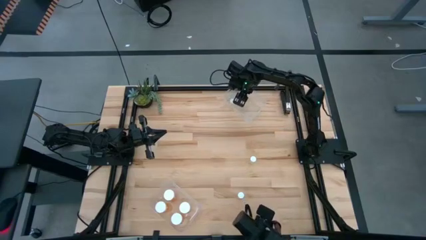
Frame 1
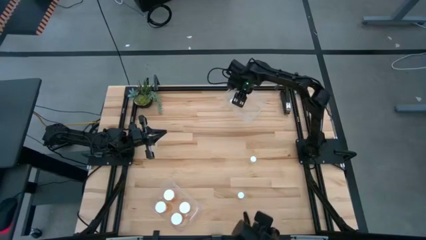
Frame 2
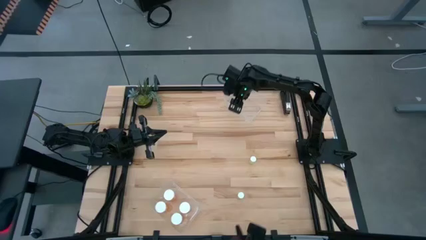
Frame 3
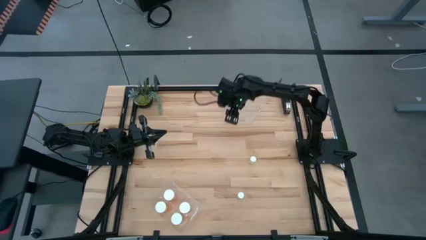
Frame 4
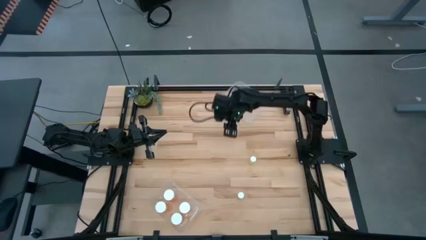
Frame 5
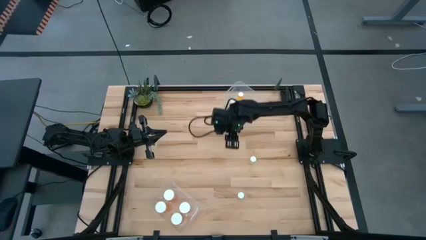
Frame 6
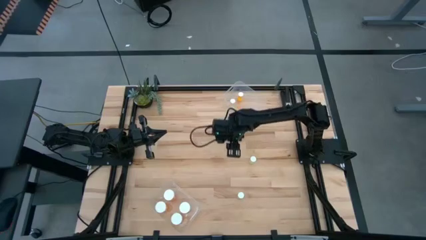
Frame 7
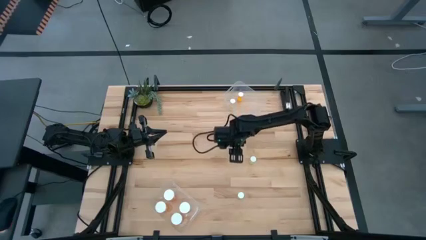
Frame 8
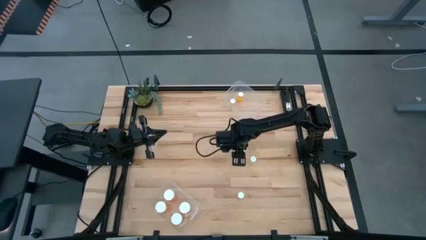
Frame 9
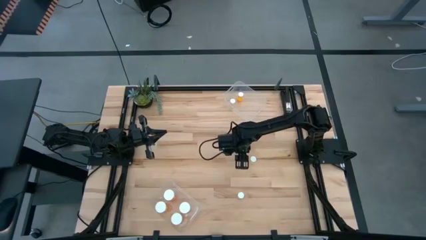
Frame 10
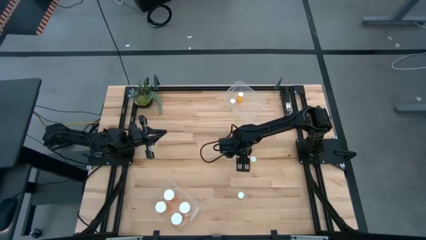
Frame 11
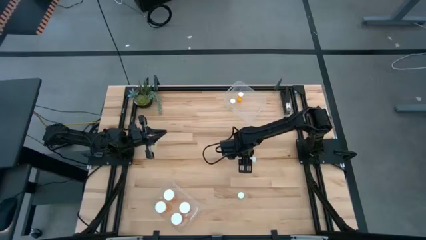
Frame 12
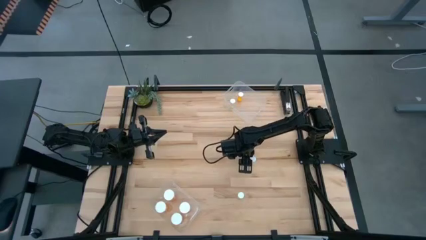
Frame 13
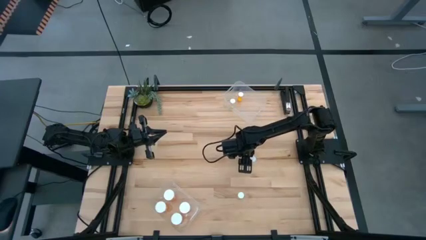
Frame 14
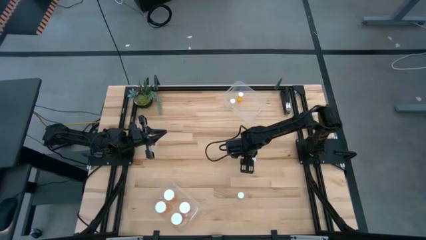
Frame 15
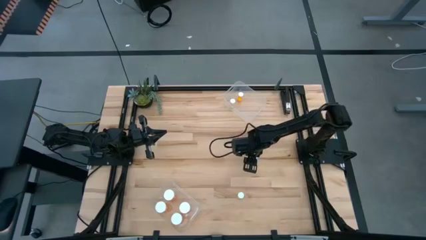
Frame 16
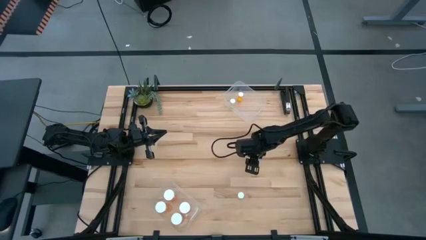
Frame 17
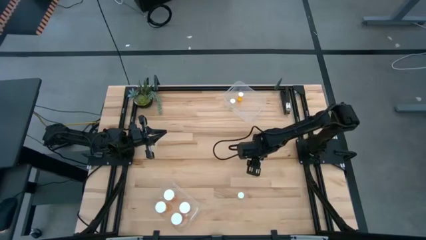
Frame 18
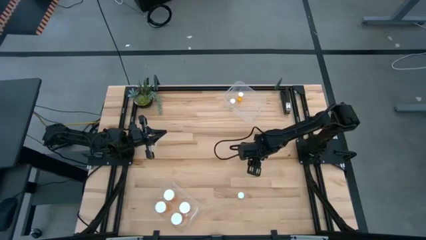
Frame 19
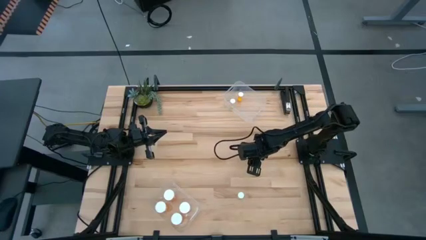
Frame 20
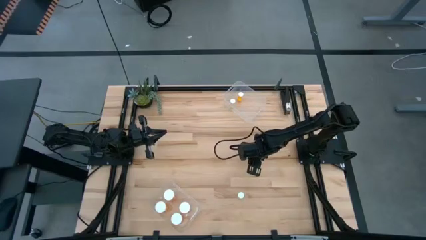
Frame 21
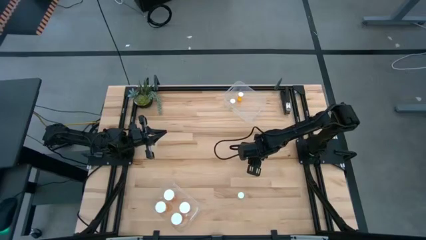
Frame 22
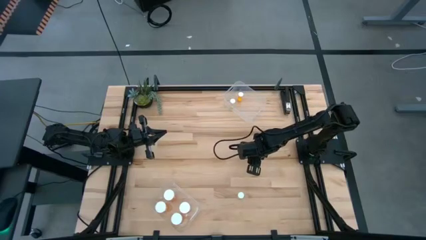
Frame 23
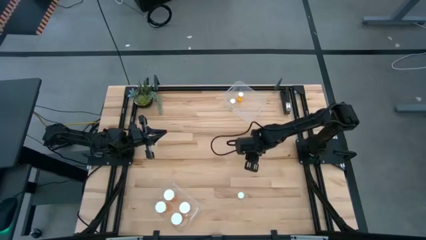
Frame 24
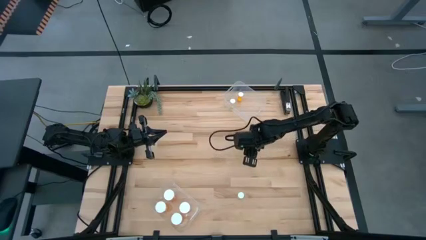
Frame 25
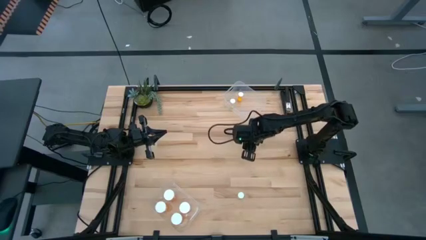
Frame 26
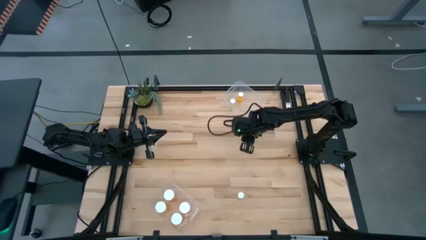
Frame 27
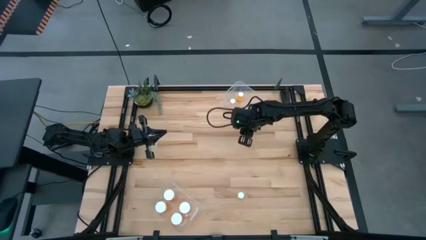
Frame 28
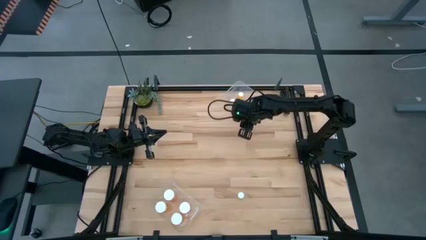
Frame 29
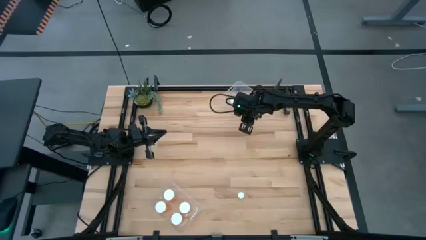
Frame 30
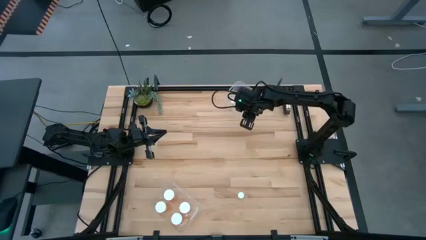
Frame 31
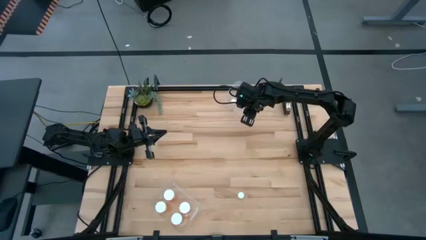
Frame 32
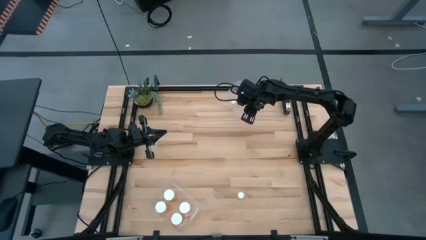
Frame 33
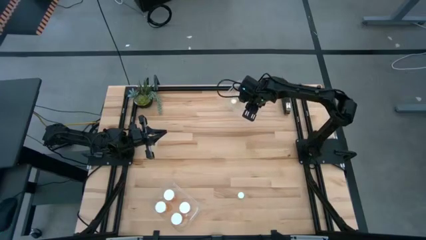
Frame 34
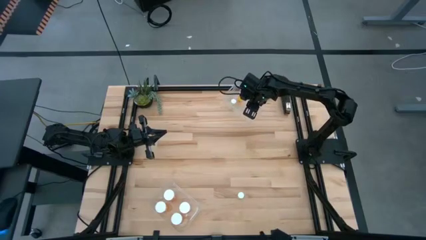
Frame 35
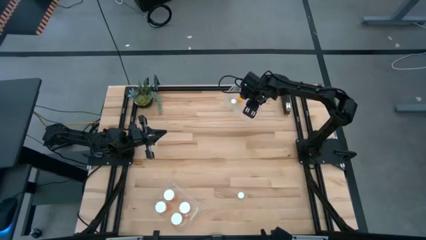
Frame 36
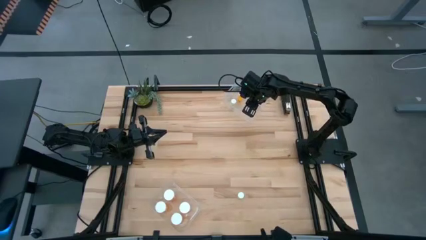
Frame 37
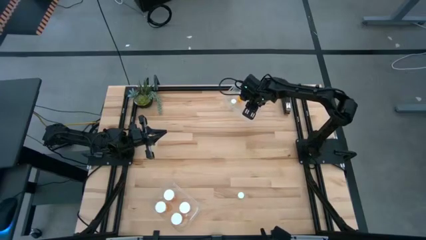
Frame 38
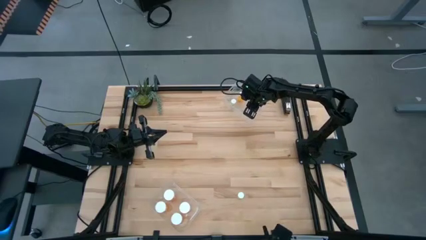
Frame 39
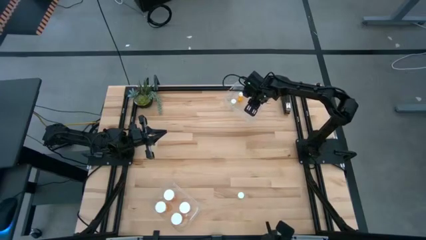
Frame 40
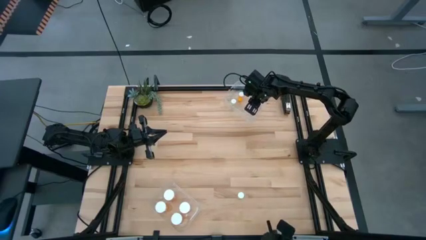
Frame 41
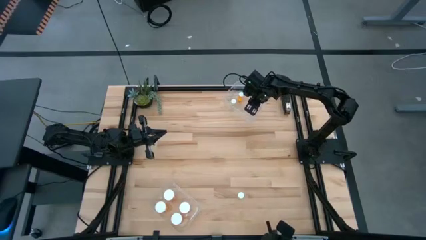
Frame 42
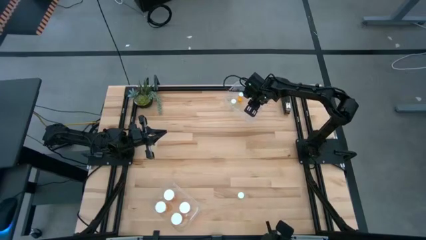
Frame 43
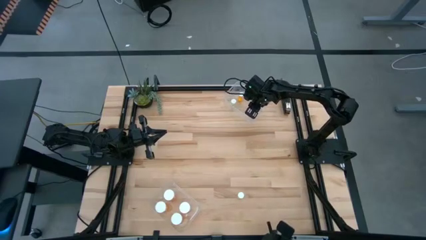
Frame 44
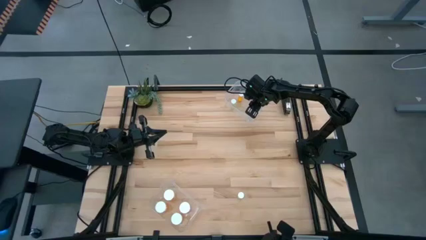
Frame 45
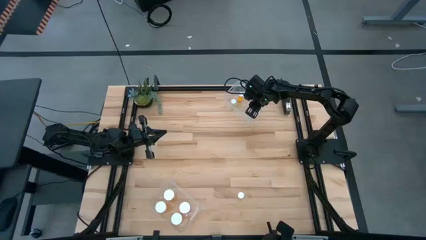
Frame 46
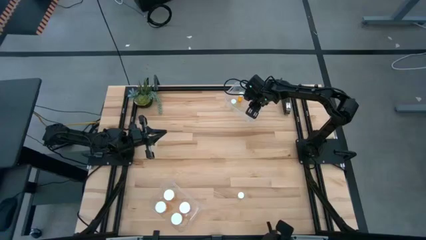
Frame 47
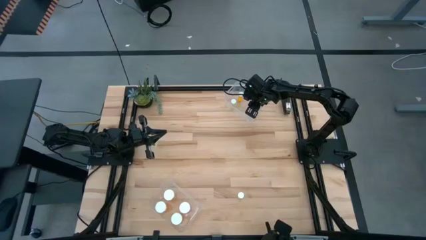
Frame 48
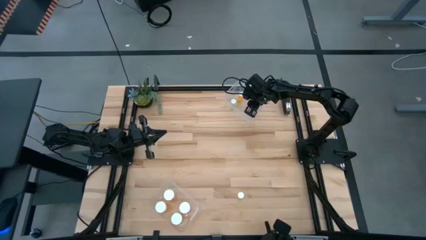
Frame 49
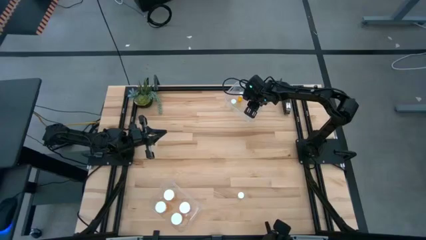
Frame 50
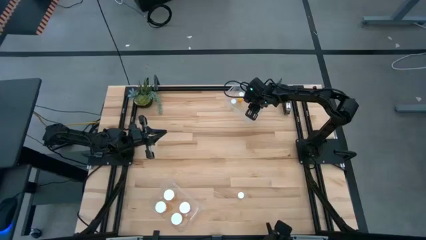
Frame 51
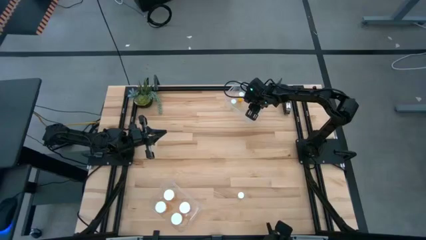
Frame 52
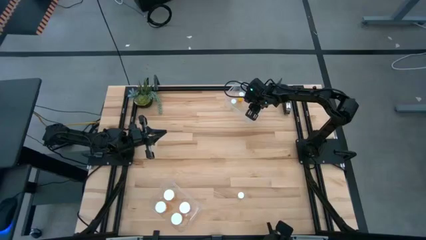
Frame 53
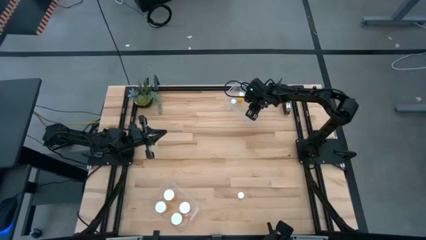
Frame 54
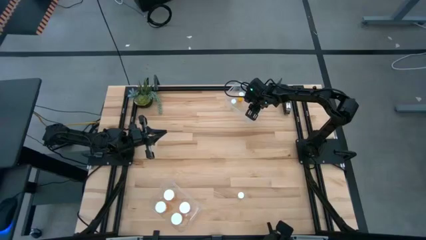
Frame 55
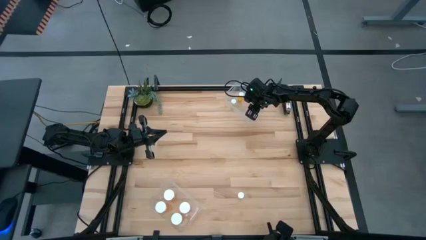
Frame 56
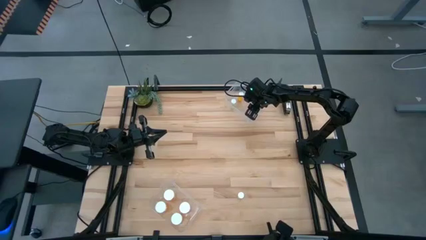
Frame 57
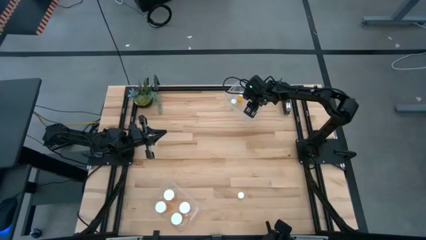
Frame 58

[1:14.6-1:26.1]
Task: Pick and place medicine bottles into bin by pill shape (circle, oval)
Put the yellow tablet bottle into the top transparent bin

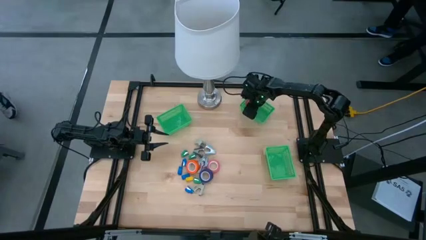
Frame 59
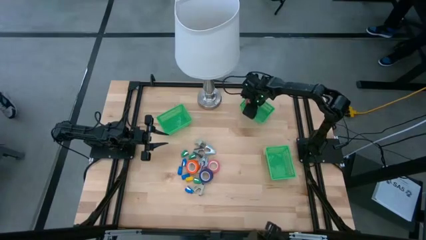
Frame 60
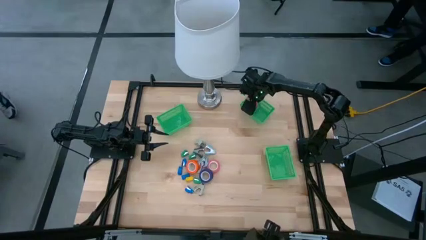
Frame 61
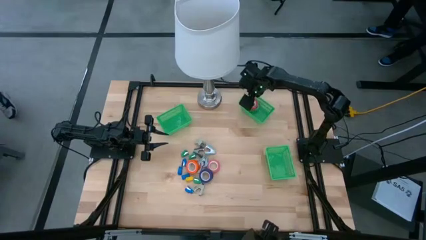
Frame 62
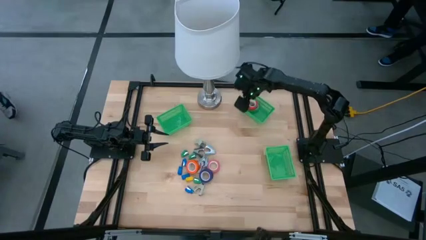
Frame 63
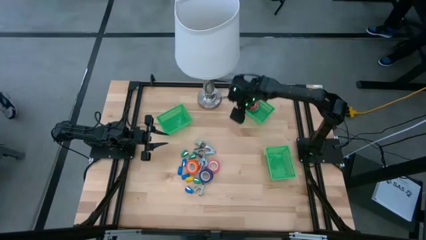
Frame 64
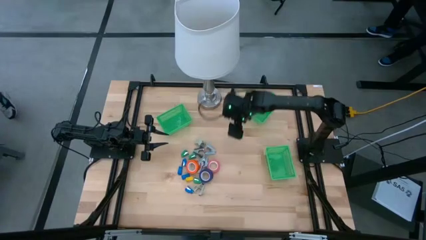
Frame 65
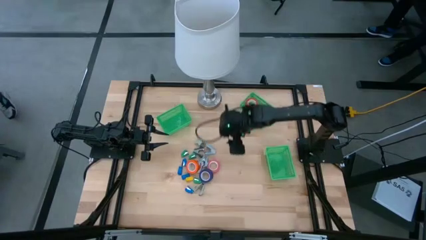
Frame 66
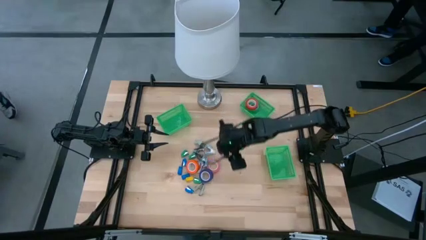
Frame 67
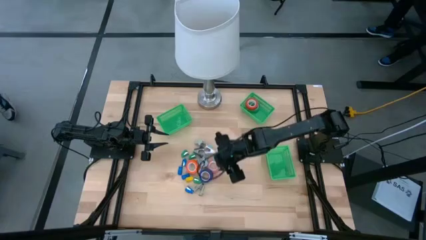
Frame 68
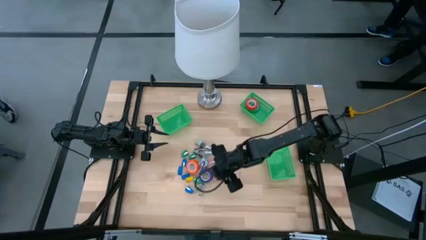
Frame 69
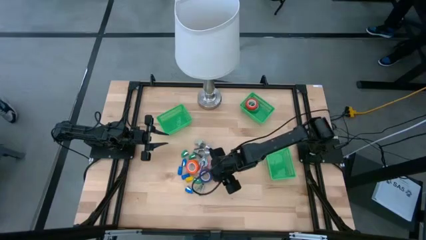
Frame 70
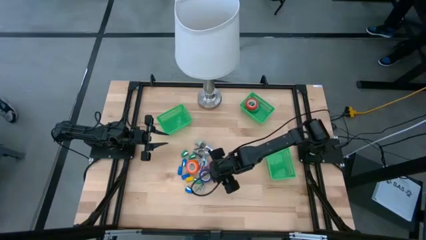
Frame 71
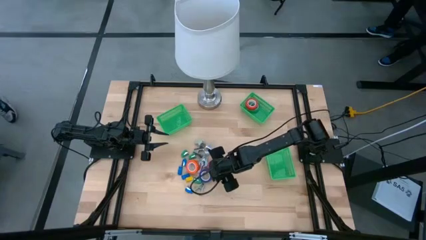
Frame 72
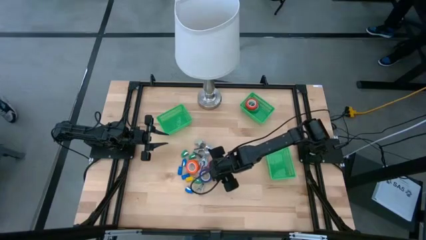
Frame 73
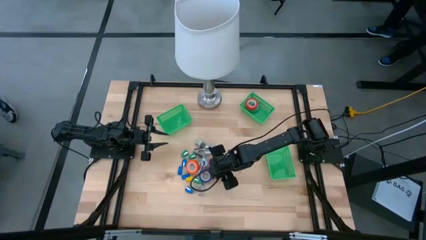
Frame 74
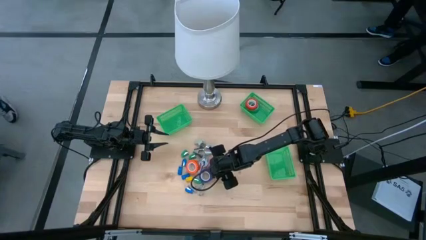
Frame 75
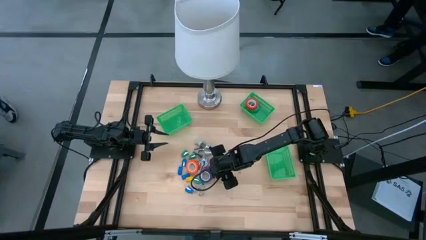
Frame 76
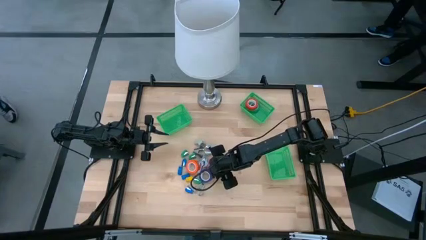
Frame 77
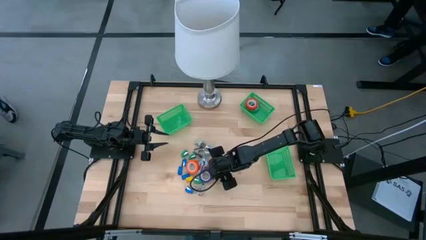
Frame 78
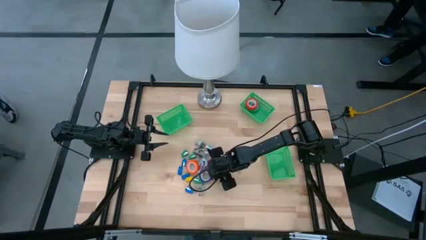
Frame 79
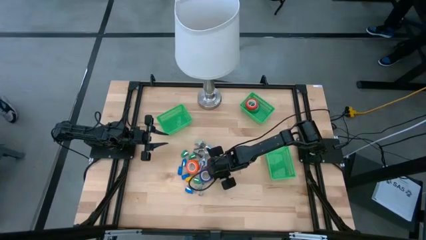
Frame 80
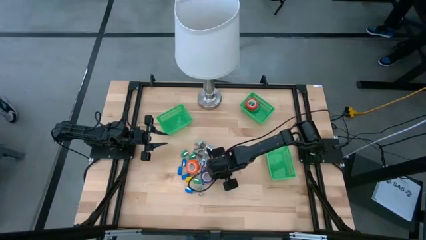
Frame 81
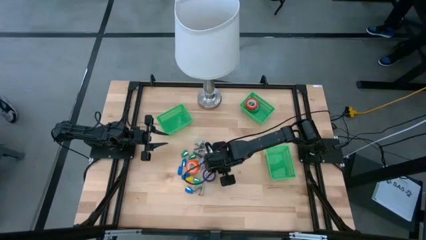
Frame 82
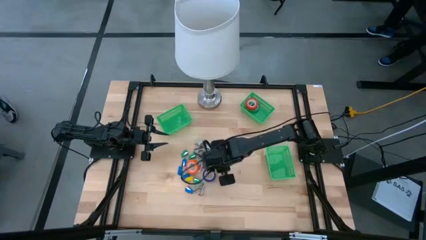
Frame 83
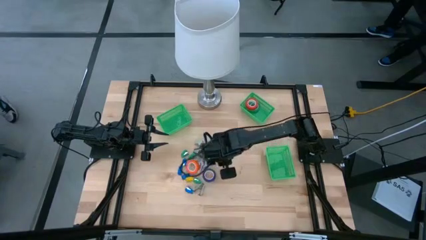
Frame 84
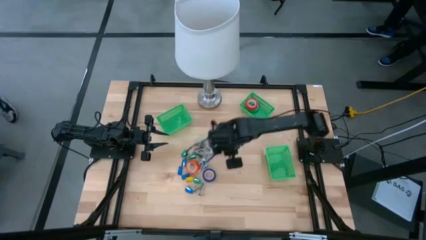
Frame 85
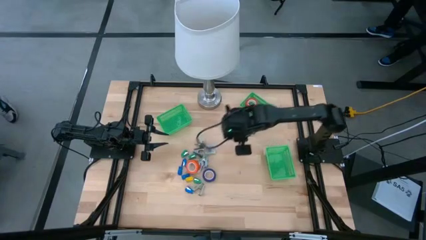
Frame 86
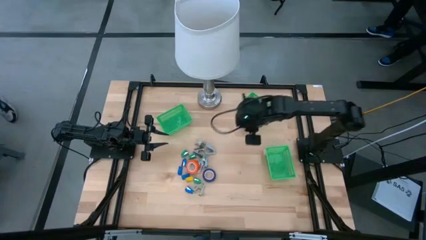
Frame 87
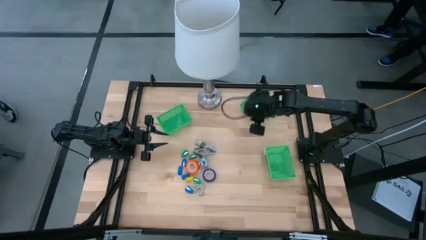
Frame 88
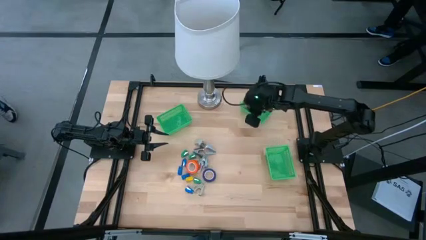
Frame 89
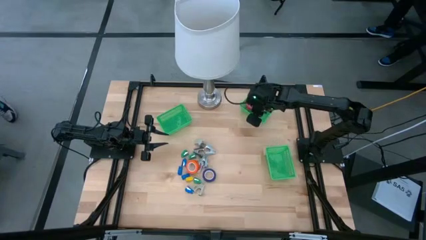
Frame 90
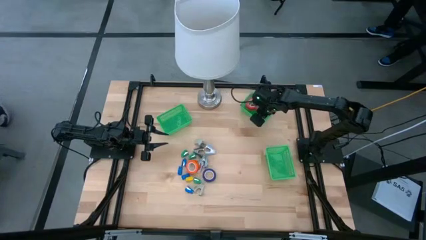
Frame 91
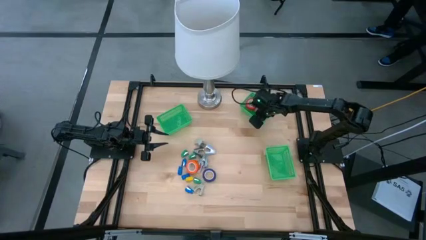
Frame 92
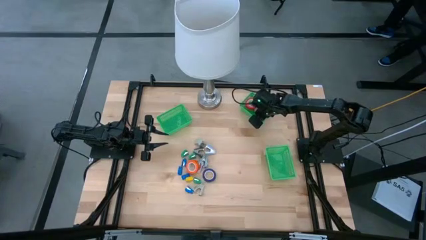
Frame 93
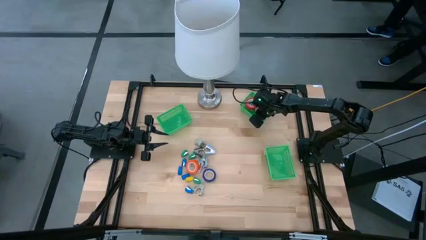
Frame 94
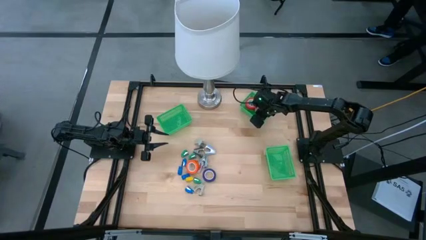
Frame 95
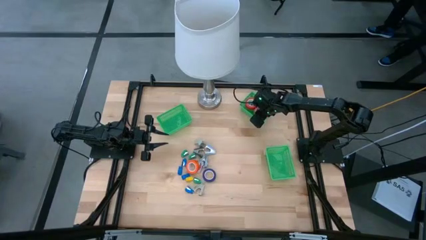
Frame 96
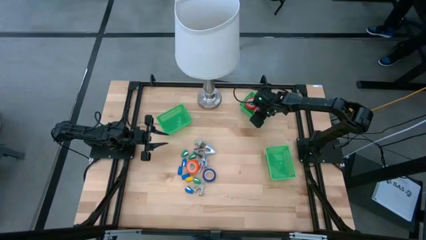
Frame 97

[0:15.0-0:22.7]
Task: Pick and place Stapler, Stapler remover, tape
Put the pink tape into the top right green bin
